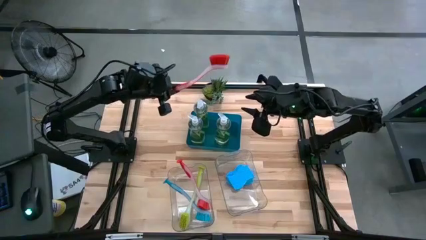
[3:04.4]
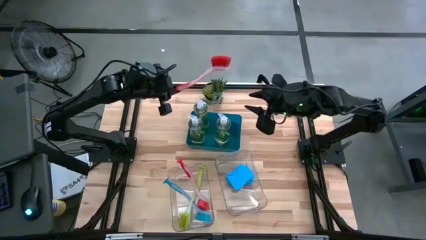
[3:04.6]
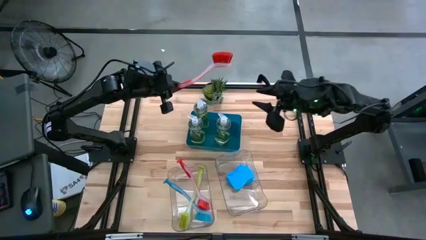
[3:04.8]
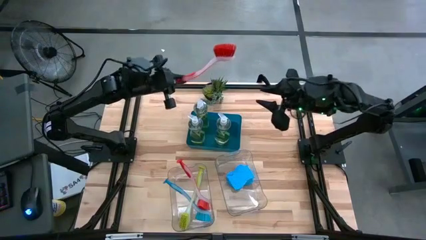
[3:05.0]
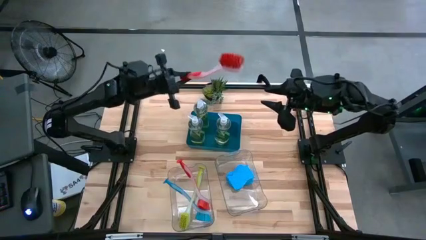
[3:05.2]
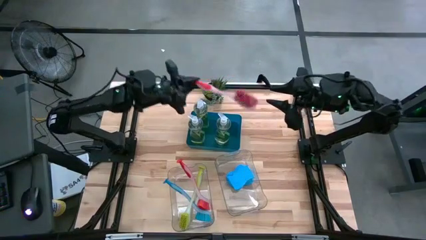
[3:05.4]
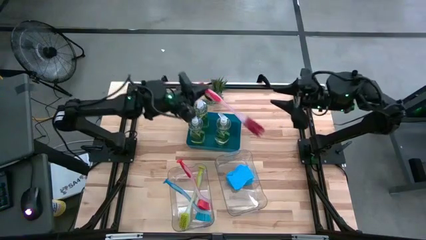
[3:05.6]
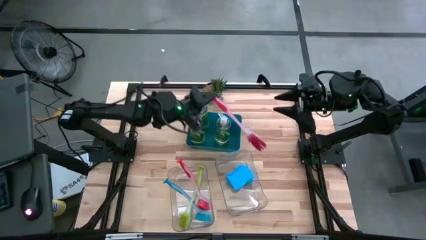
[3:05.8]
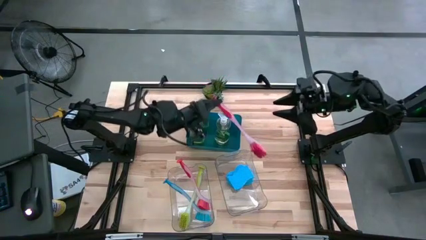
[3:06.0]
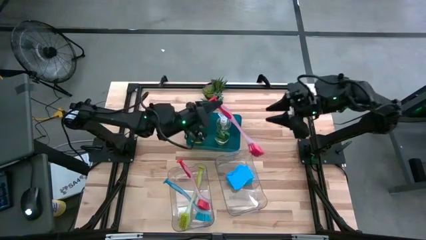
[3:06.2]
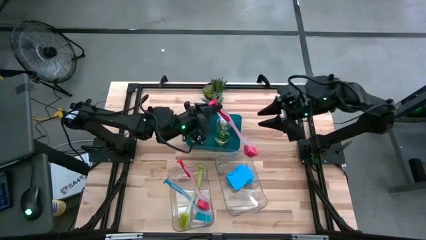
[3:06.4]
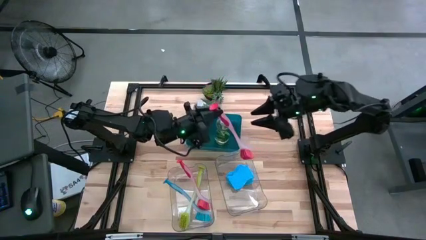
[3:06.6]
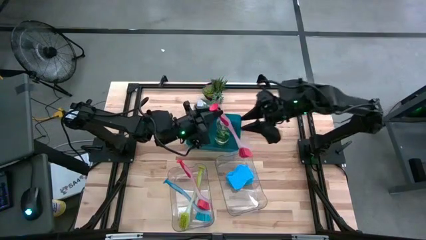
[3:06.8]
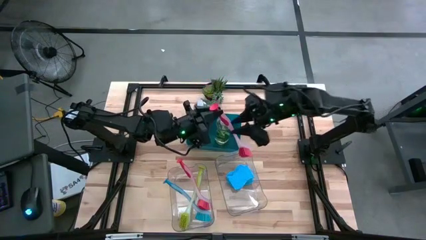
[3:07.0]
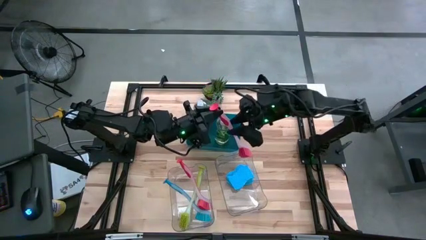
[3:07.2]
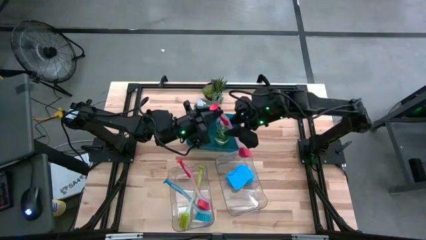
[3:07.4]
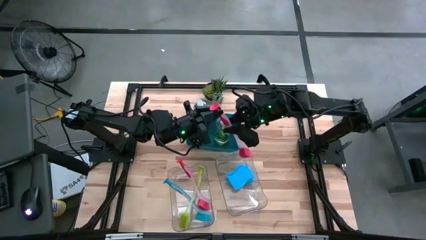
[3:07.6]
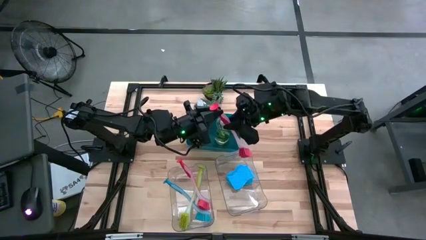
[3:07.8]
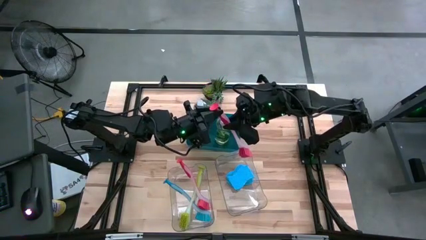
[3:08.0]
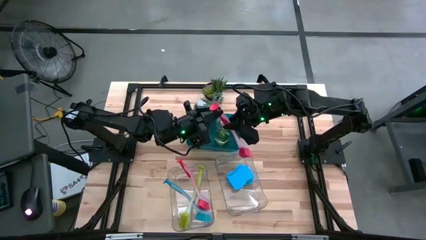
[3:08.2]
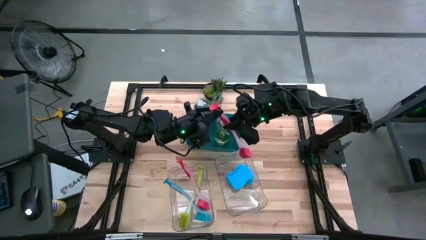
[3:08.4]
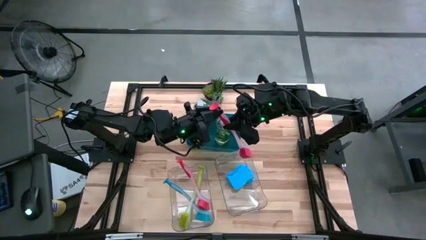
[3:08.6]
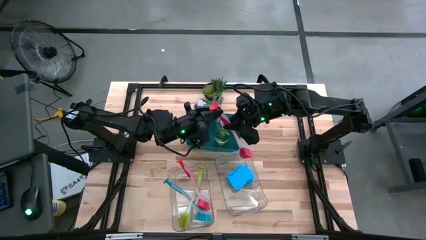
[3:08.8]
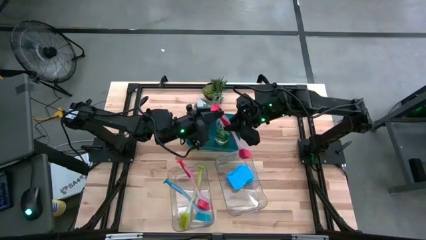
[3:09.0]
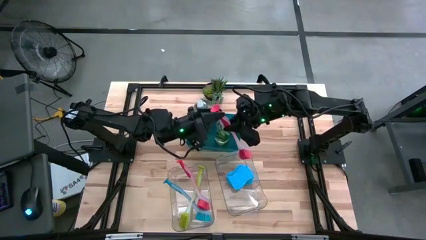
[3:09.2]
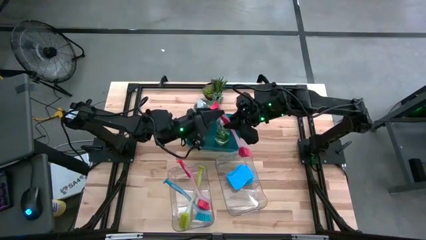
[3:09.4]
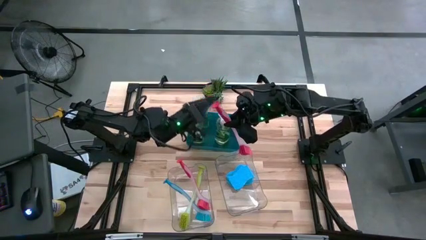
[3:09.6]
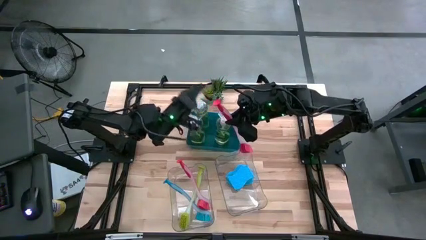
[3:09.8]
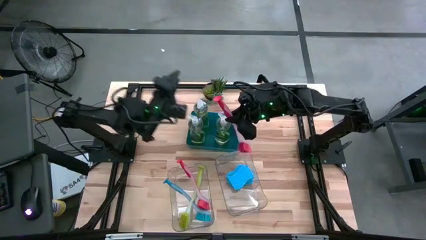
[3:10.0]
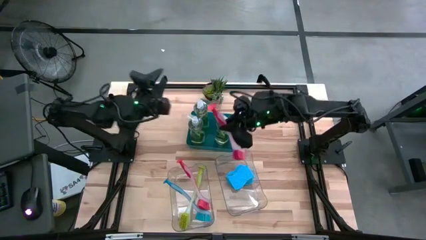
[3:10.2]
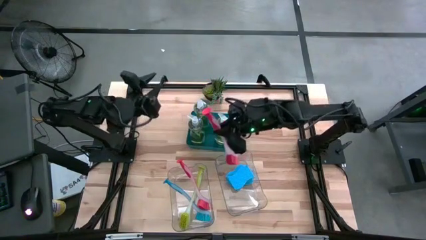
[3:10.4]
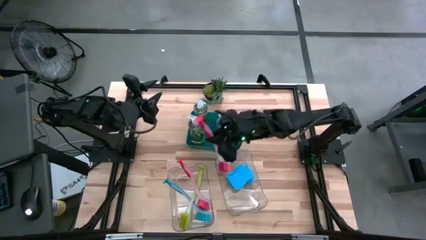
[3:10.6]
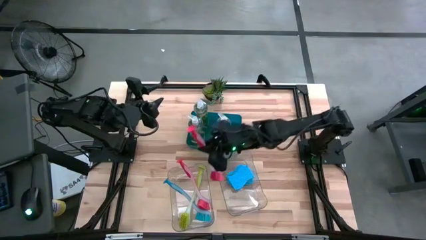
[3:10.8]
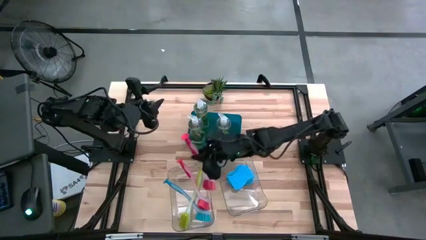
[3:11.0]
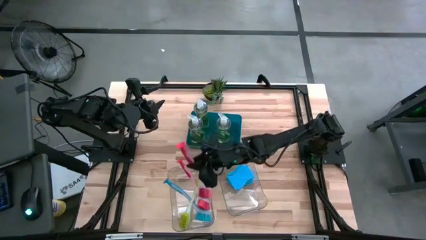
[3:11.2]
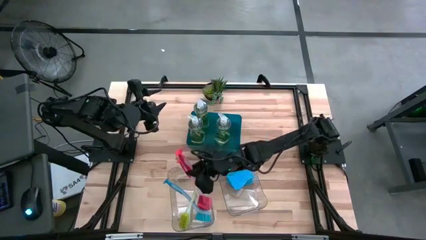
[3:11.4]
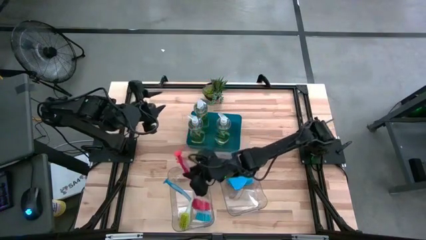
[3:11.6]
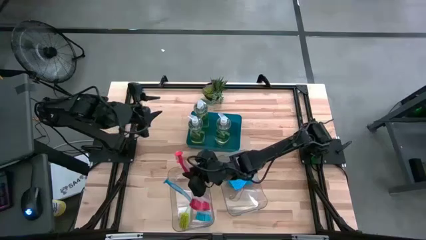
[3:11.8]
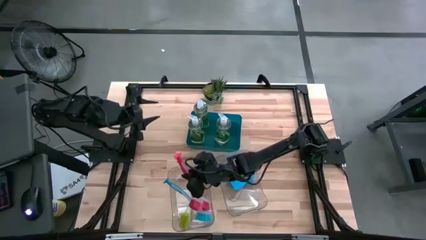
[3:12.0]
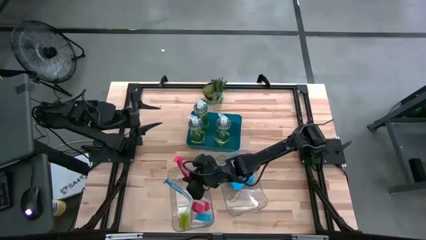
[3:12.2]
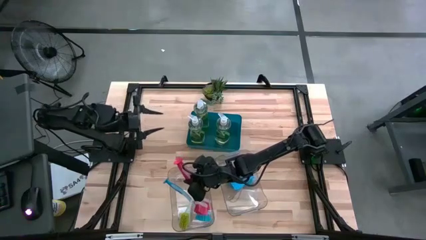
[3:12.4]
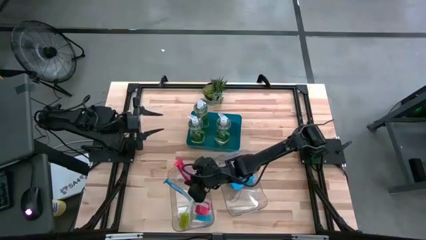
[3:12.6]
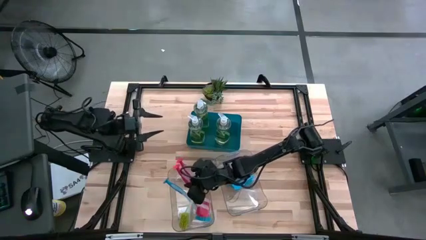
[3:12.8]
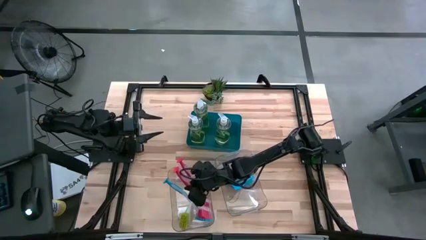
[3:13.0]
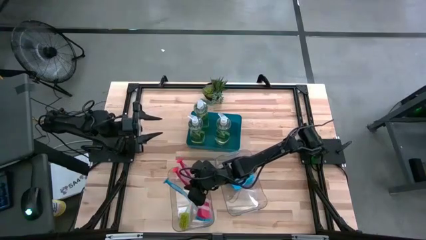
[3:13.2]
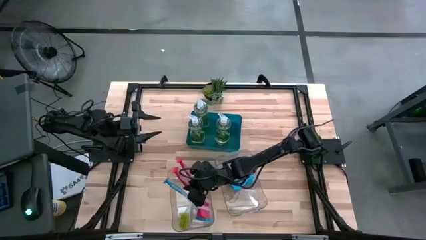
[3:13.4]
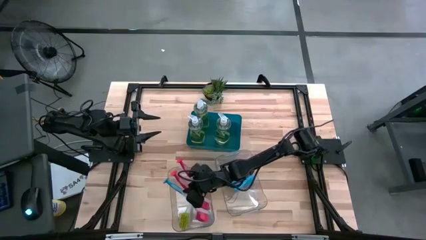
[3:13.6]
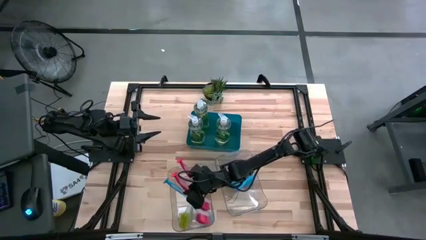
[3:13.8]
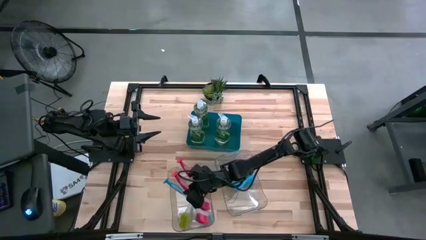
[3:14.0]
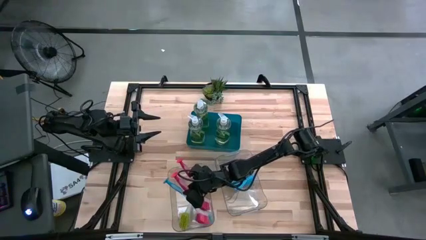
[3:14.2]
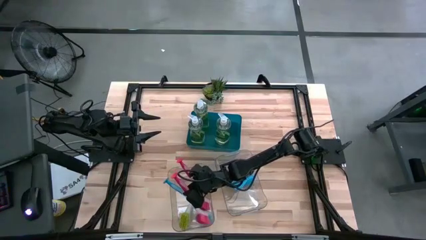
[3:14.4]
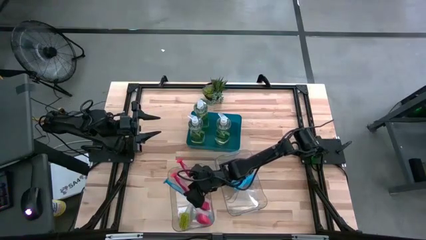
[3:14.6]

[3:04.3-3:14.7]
Task: Pick & Place Kitchen Sink Supplies
Put the red dish brush into the left transparent bin

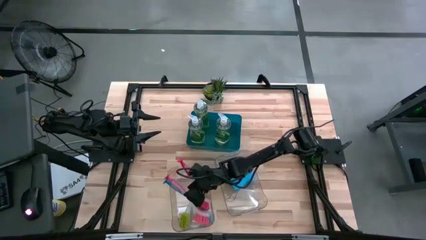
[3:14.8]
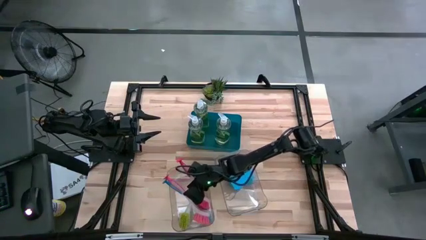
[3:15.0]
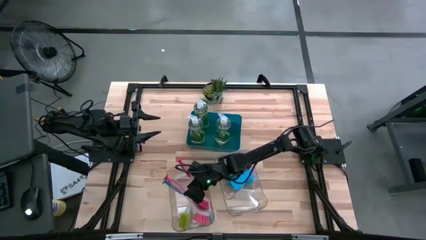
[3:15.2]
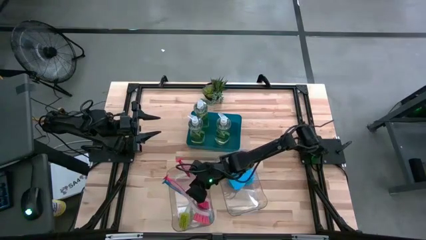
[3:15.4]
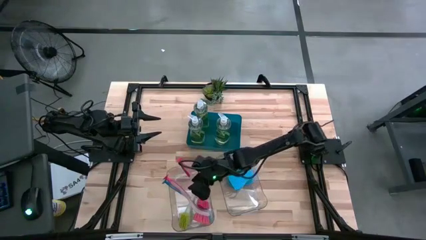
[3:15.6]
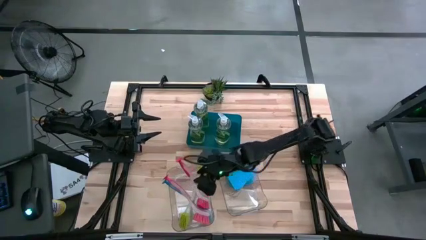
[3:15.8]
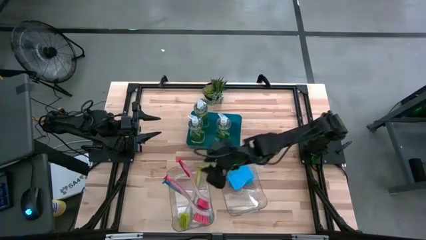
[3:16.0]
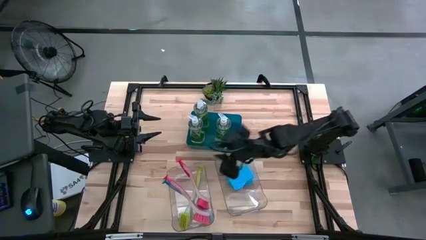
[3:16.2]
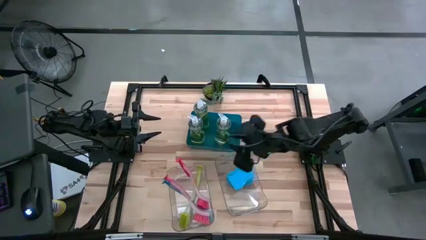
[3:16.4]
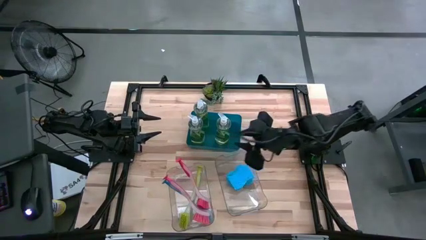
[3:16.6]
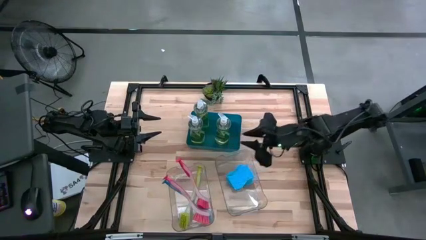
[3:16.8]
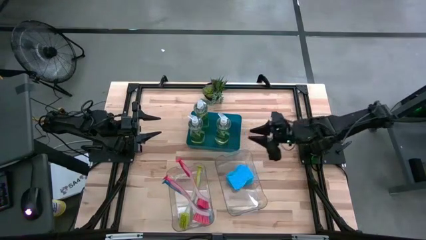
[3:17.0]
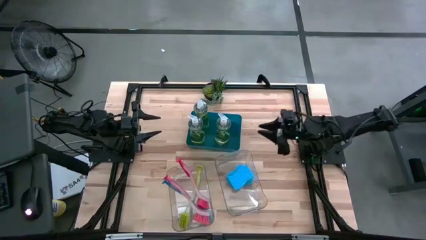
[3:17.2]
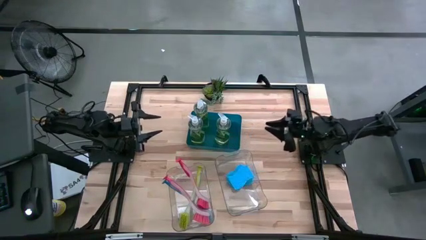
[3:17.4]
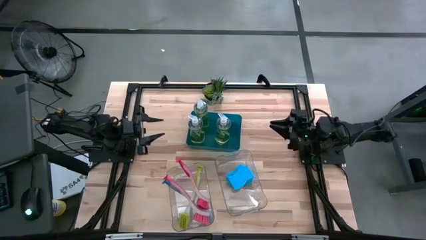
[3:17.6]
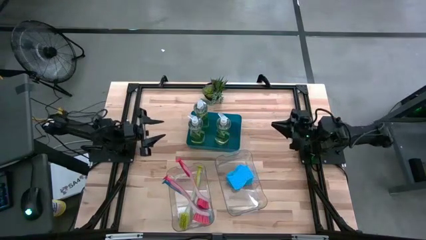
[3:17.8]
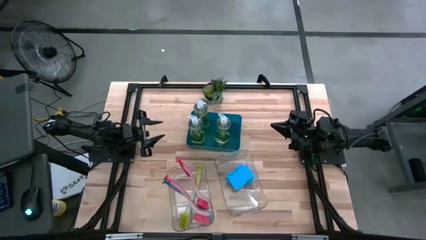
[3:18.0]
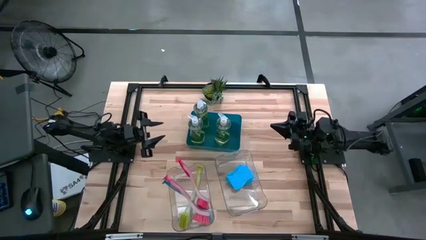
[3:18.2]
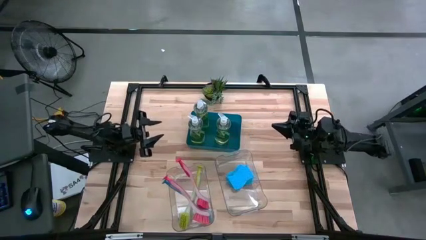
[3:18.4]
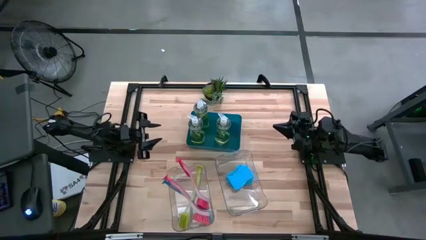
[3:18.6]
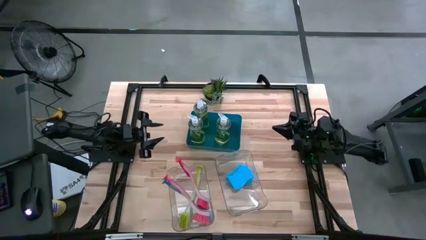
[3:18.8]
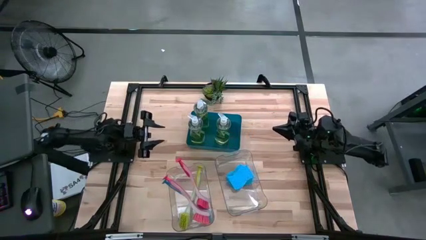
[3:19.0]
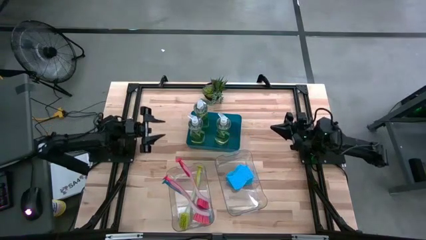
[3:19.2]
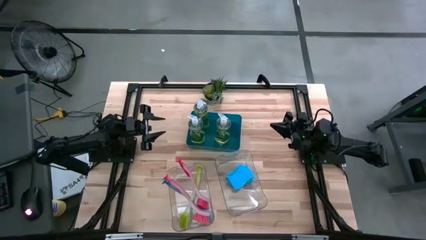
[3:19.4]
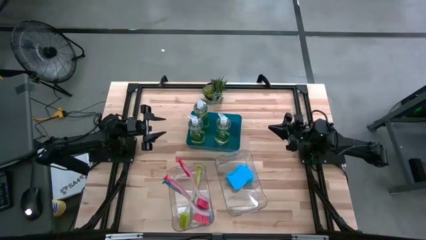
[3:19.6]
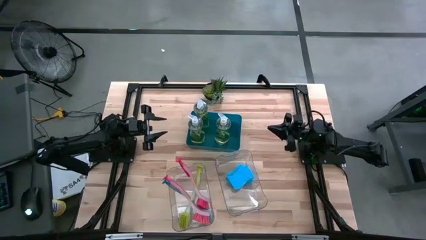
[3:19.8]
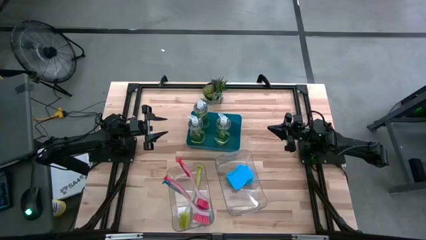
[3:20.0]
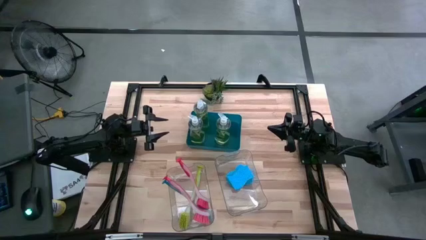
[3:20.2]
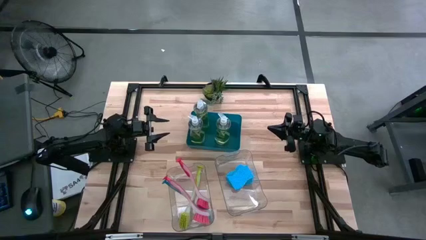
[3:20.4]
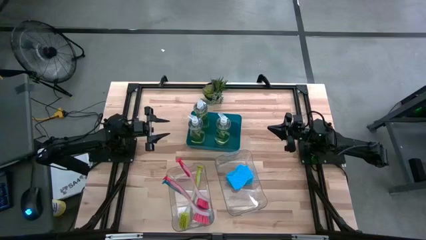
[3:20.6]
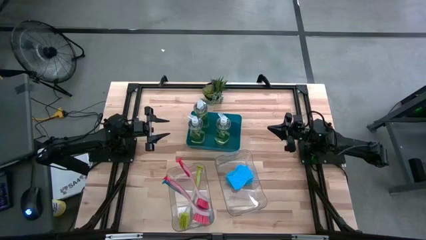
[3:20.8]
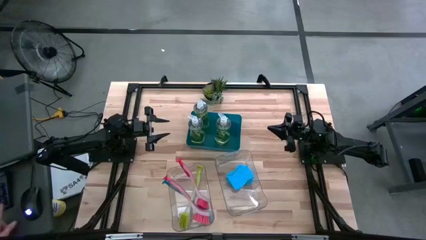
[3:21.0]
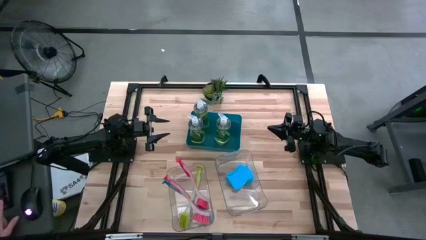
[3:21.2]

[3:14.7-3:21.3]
Return to Home Position
